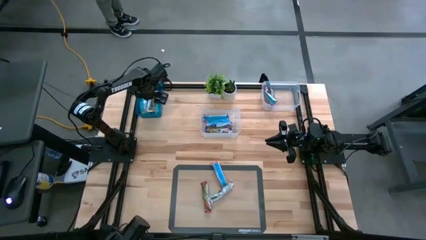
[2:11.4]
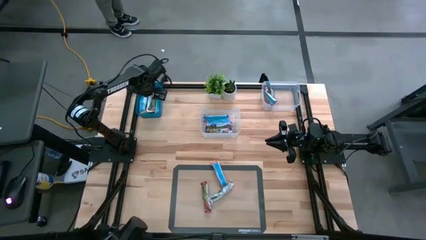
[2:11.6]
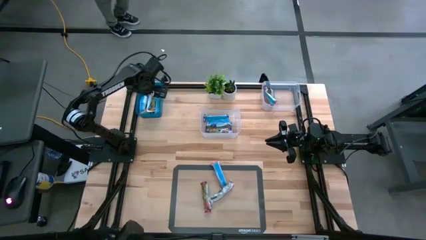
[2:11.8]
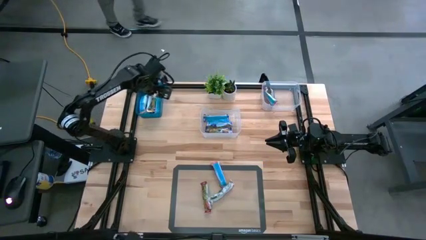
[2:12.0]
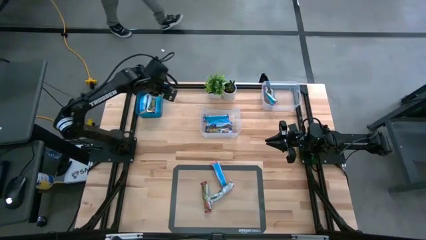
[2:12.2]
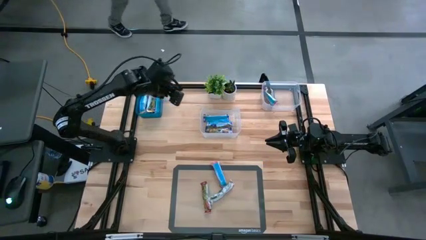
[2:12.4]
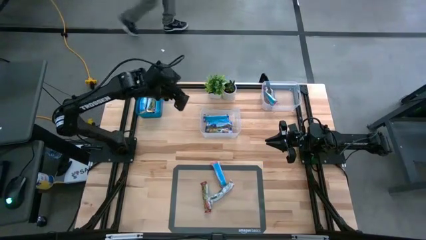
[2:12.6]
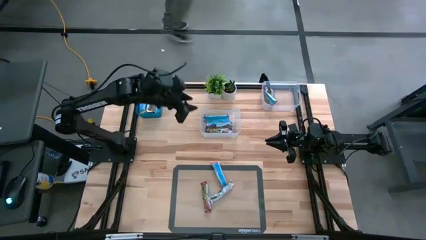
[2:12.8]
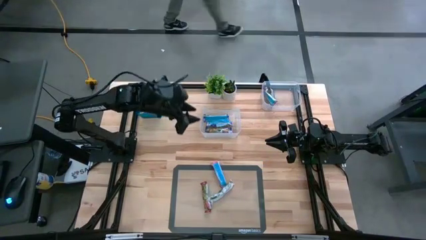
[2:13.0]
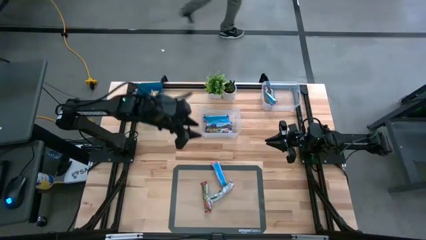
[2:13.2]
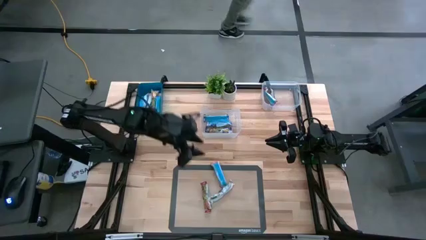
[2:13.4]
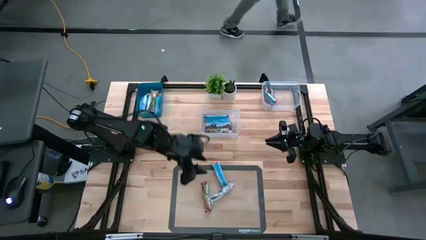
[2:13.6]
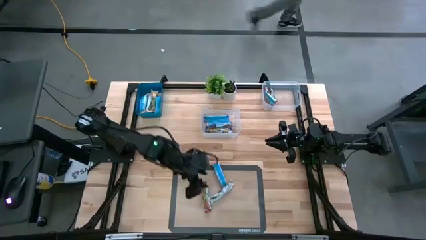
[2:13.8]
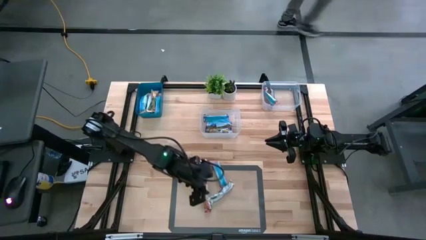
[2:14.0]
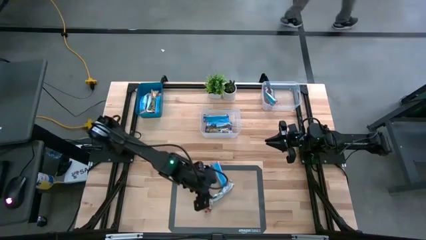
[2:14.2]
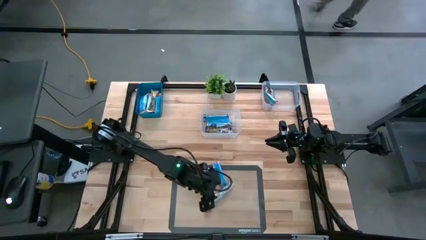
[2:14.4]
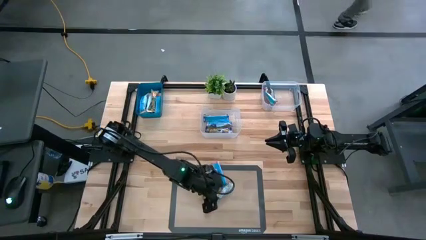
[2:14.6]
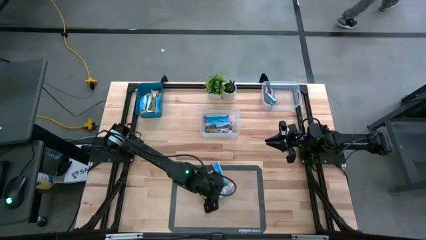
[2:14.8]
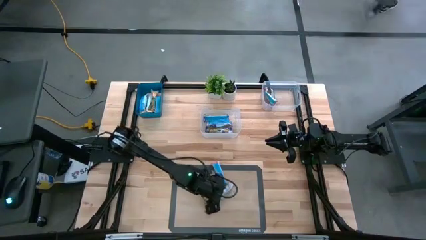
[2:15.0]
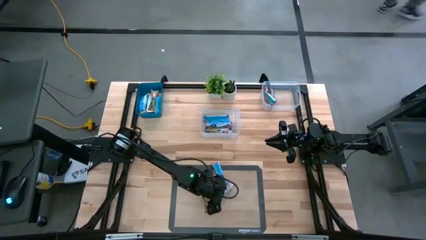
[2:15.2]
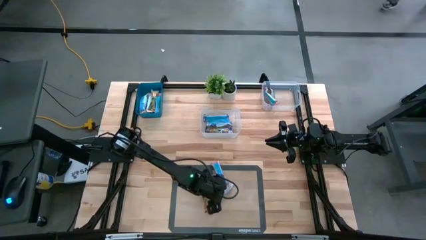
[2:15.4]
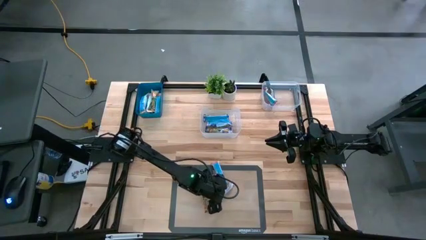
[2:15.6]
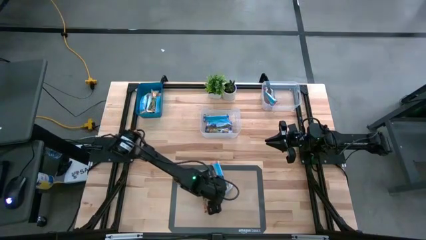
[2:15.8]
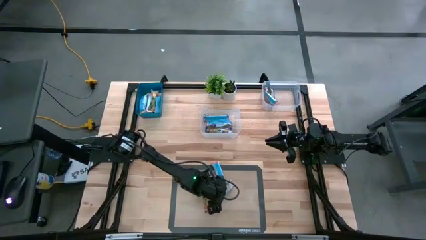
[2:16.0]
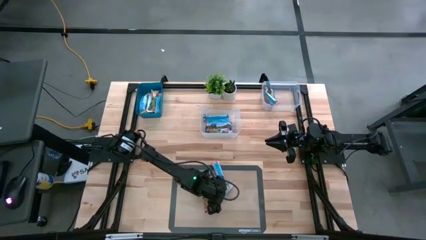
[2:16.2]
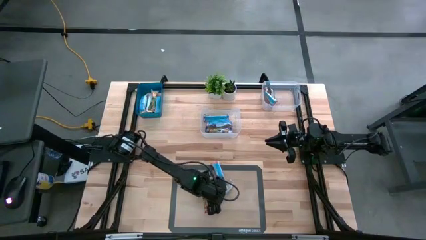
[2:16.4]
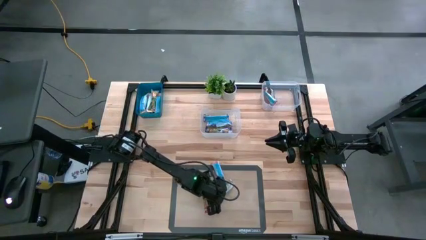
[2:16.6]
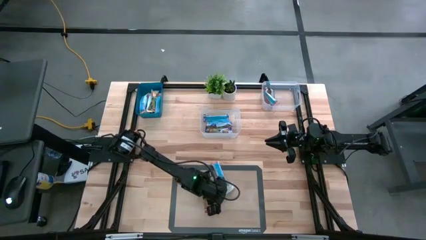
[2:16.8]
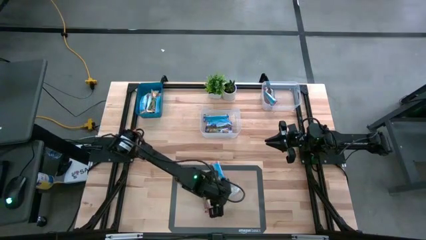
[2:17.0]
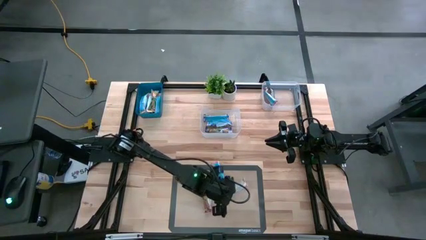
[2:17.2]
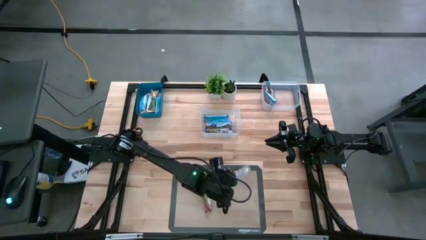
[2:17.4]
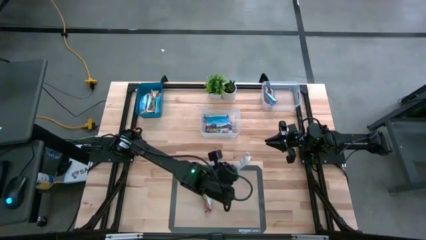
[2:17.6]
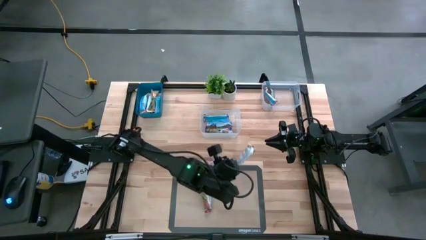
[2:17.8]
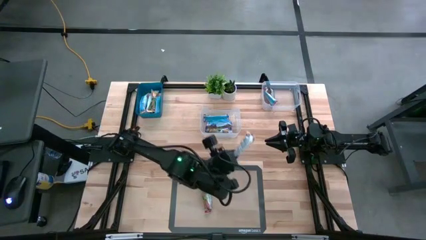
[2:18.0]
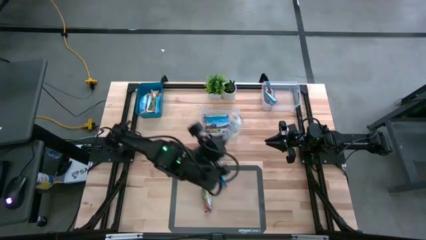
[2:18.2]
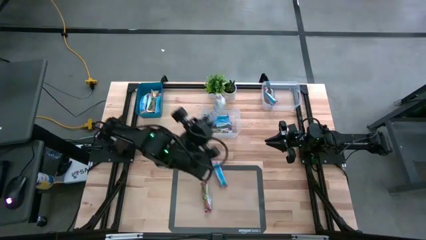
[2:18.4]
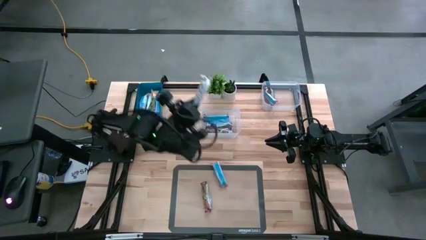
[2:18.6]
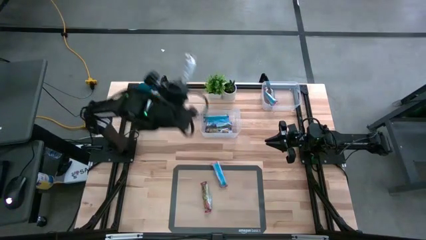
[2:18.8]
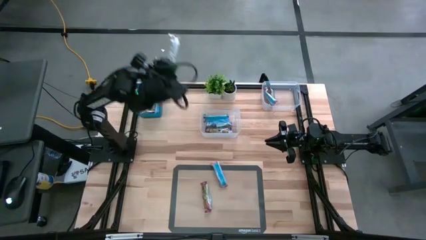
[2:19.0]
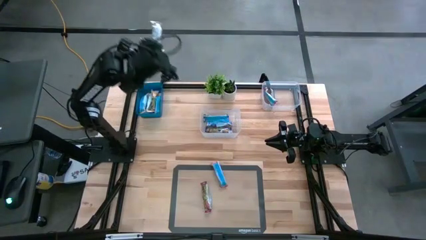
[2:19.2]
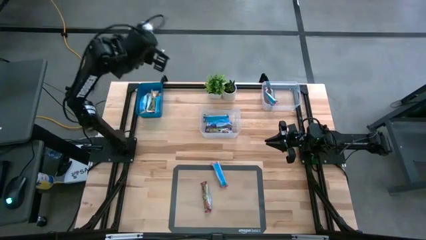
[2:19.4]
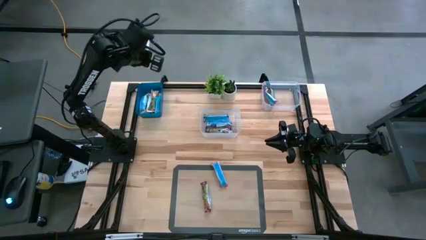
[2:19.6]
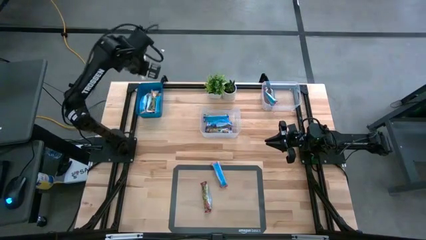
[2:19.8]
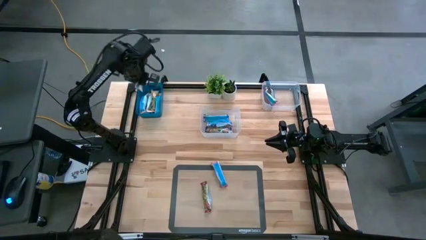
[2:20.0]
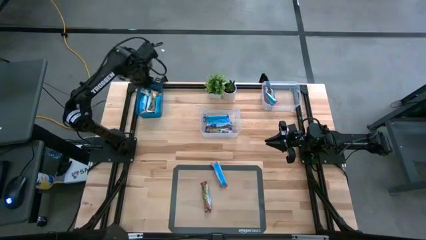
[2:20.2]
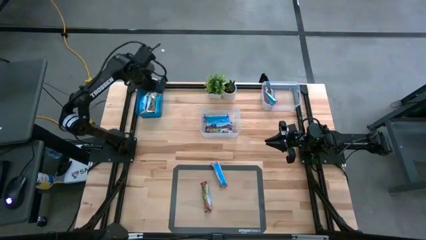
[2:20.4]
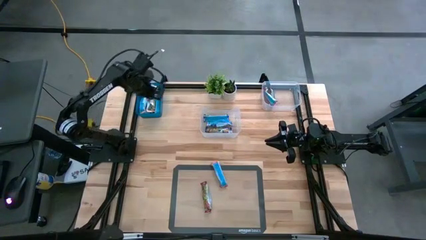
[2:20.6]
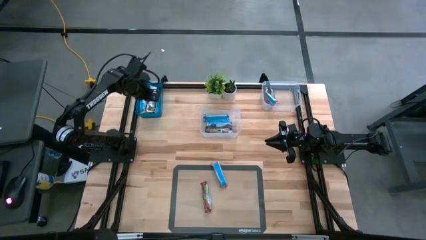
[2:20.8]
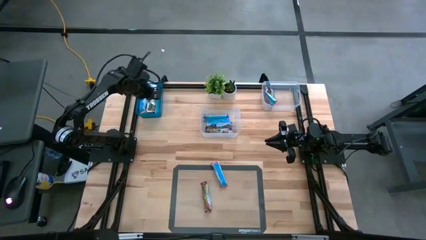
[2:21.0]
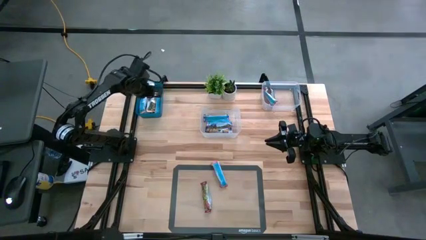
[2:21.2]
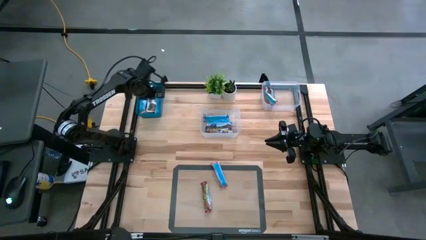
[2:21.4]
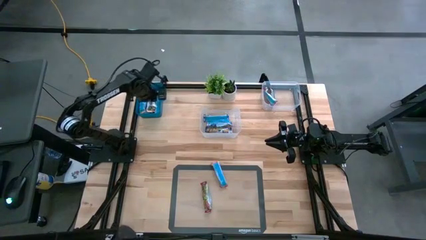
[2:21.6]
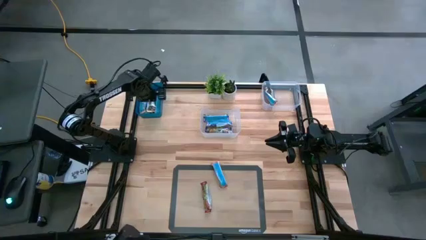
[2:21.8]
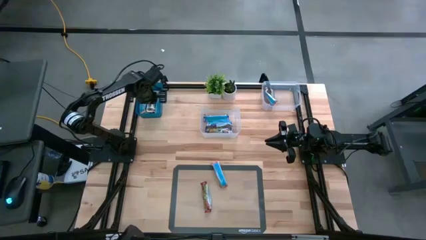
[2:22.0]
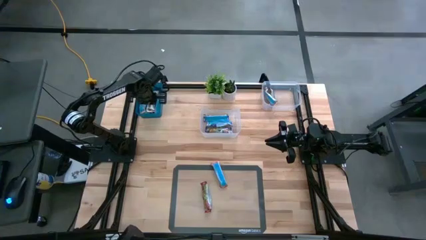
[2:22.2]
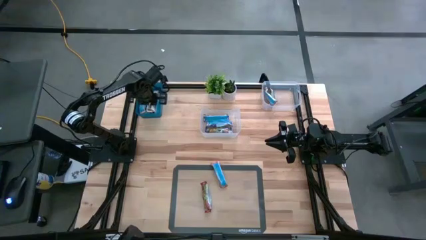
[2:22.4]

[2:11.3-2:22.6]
Task: Pick and place Granola Bars by type
Put the orange granola bar in the blue bin
